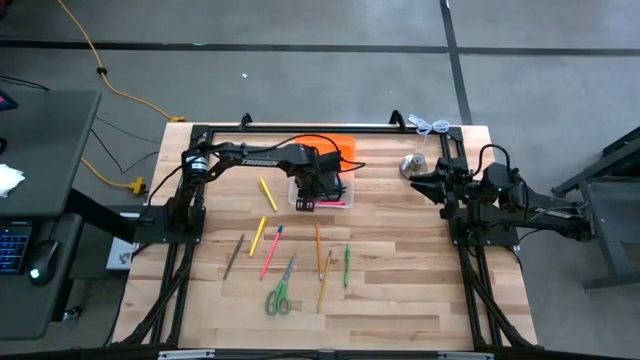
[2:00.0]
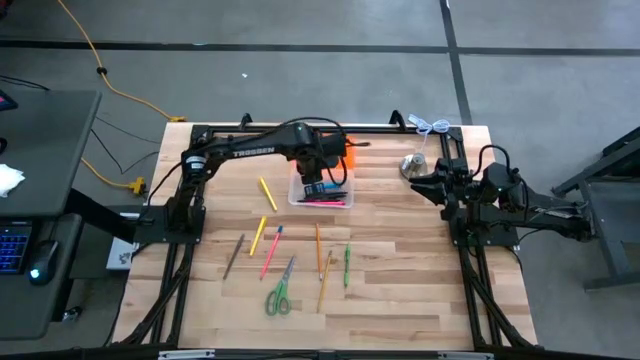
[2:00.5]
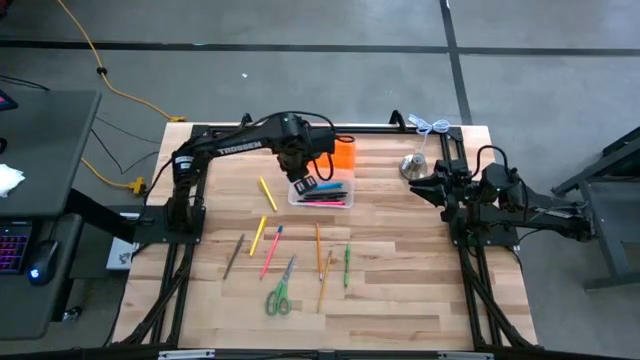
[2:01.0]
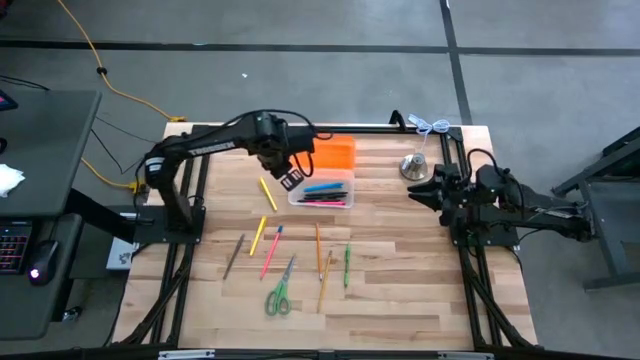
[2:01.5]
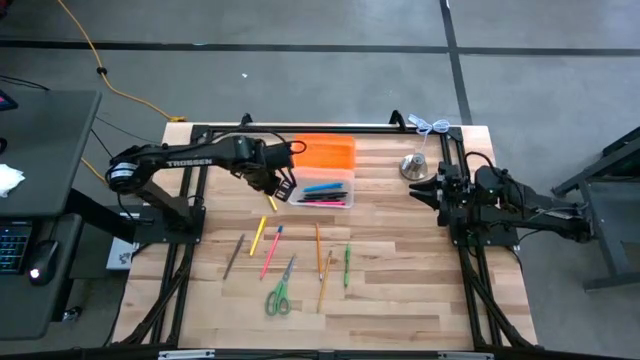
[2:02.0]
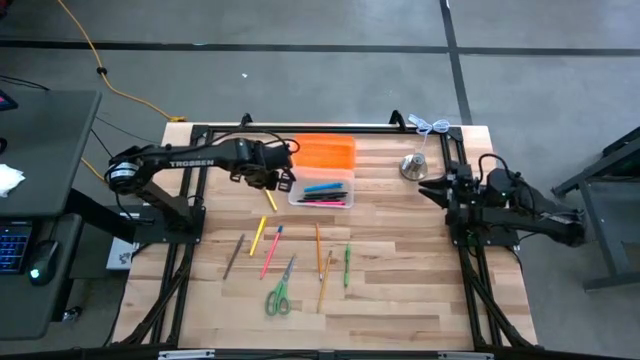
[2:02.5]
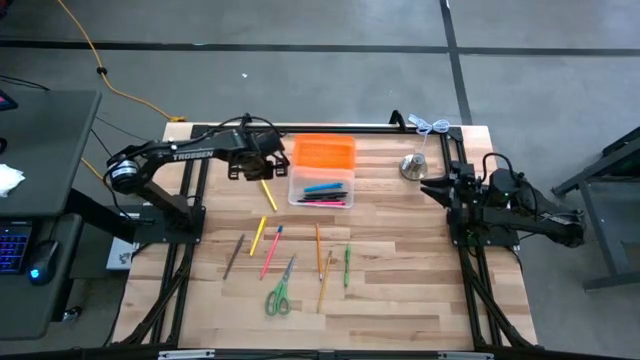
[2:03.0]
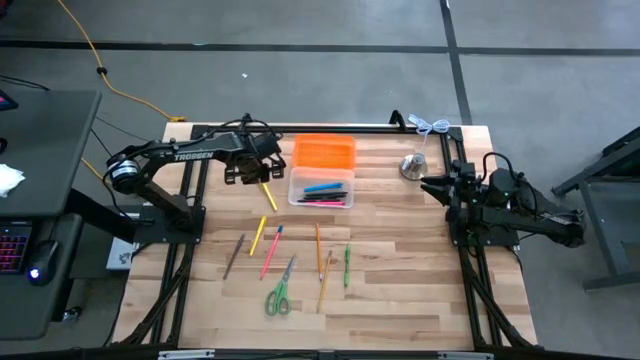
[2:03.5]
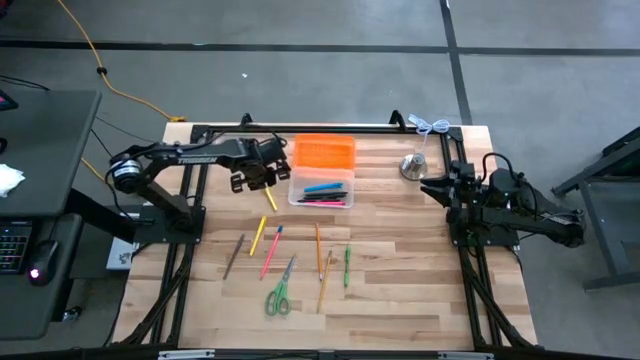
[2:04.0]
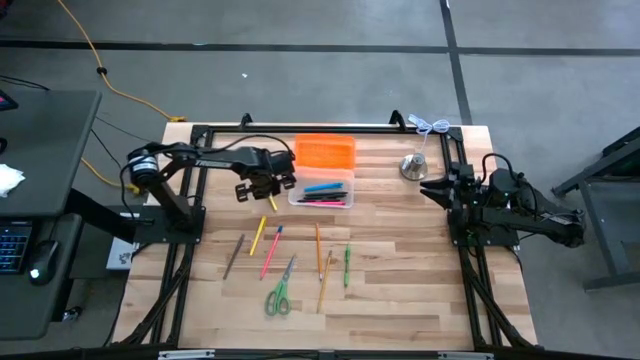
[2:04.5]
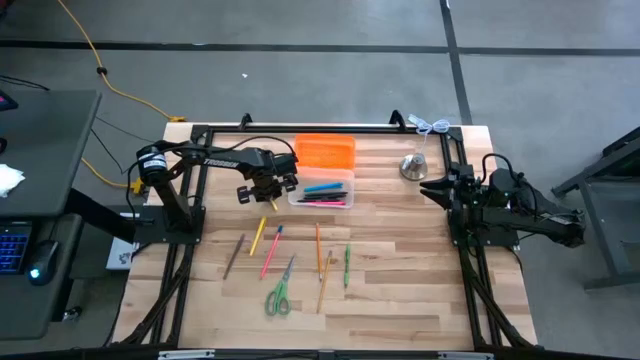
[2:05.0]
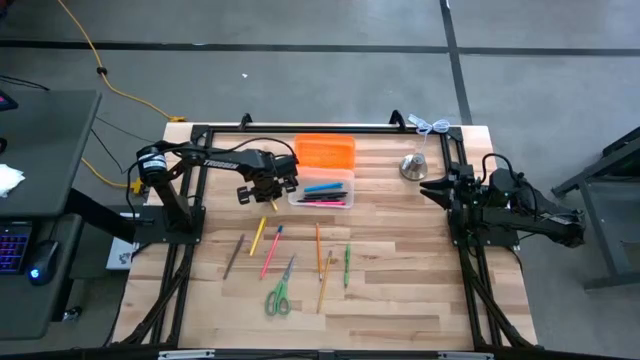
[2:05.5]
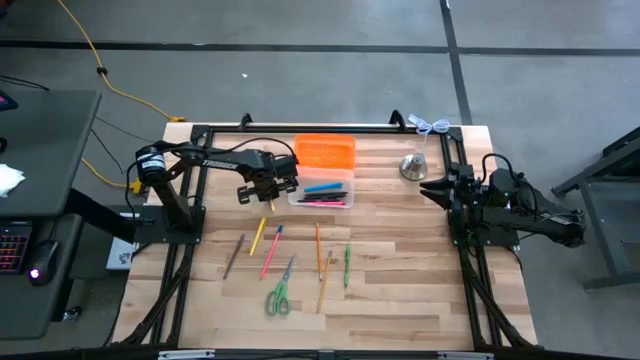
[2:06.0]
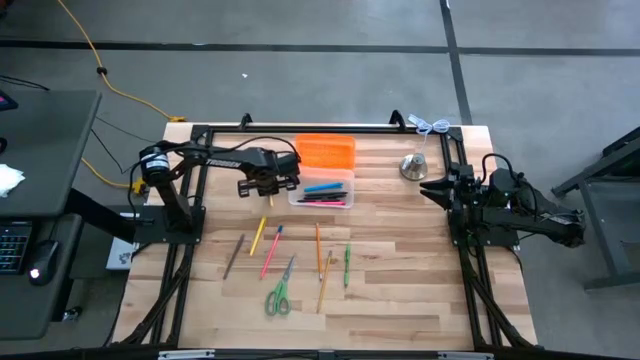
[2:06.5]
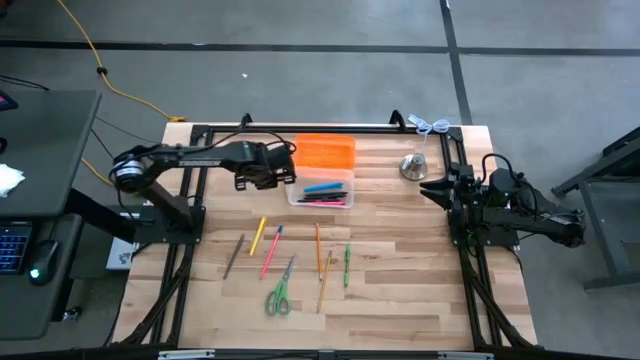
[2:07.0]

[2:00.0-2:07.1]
Task: Pick & place school supplies into a supply box
Put the yellow pen into the transparent supply box

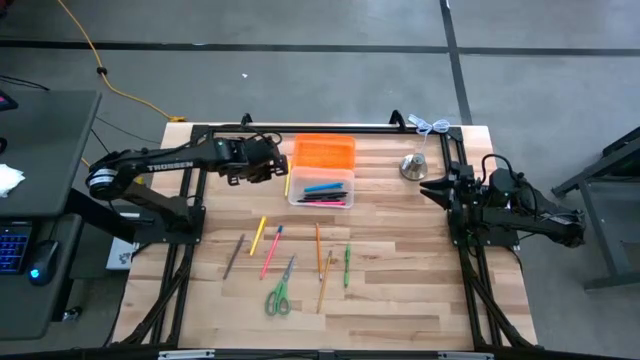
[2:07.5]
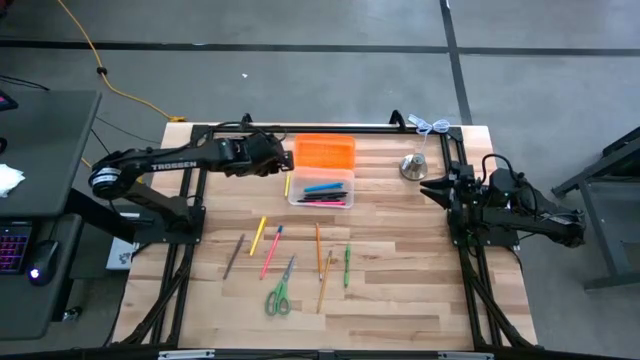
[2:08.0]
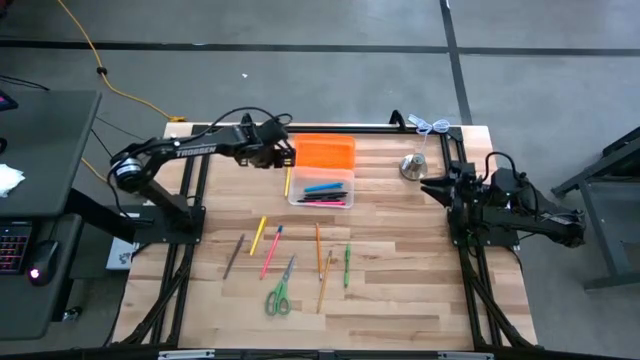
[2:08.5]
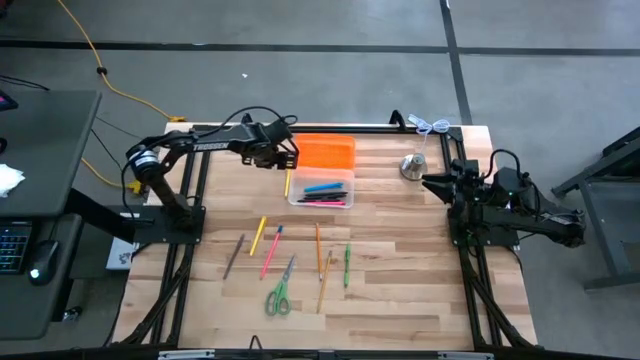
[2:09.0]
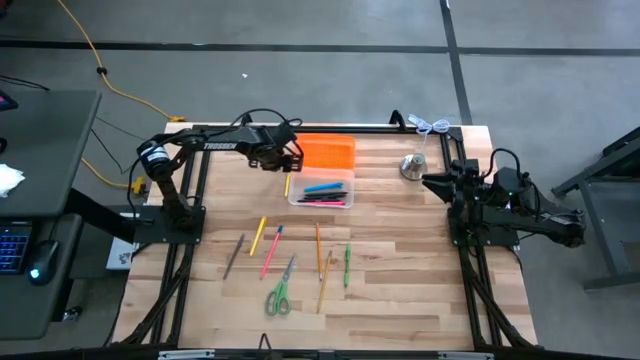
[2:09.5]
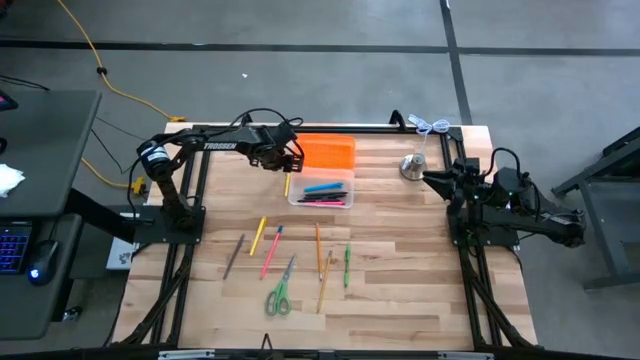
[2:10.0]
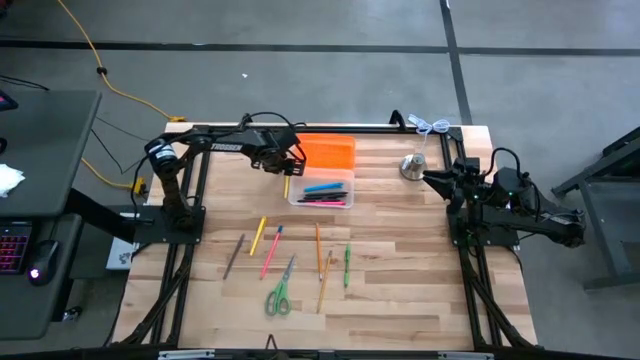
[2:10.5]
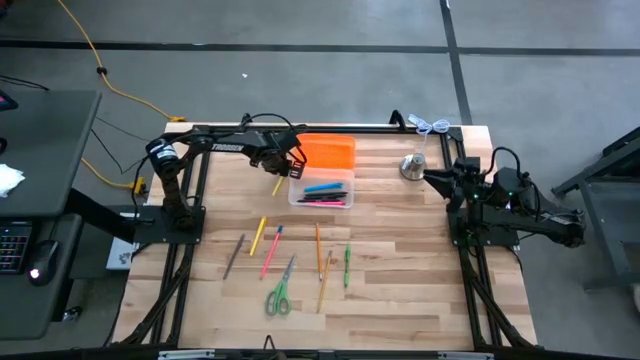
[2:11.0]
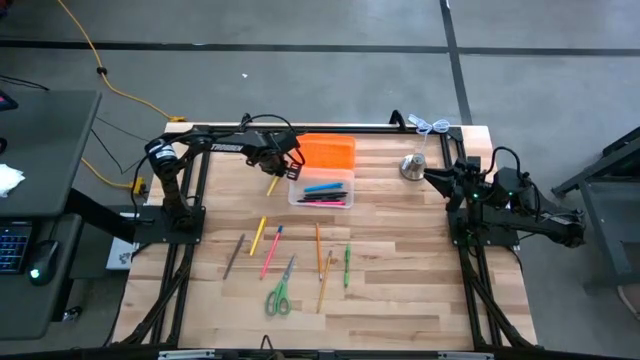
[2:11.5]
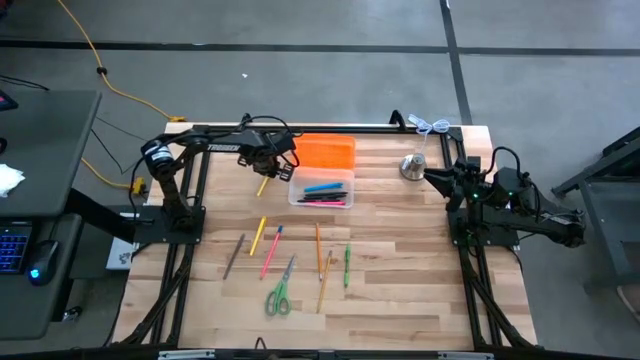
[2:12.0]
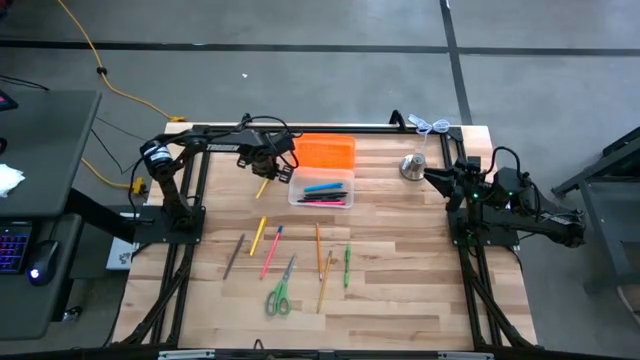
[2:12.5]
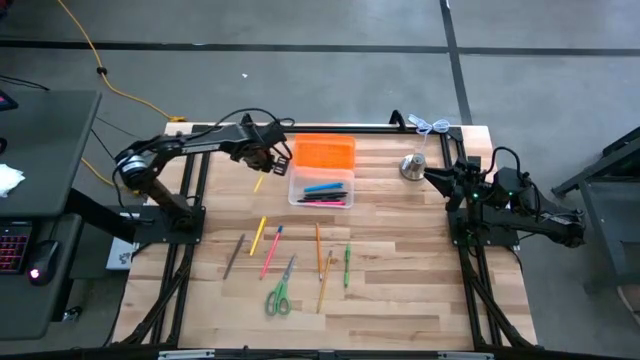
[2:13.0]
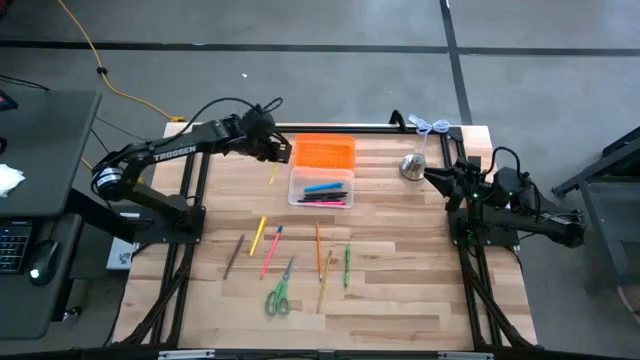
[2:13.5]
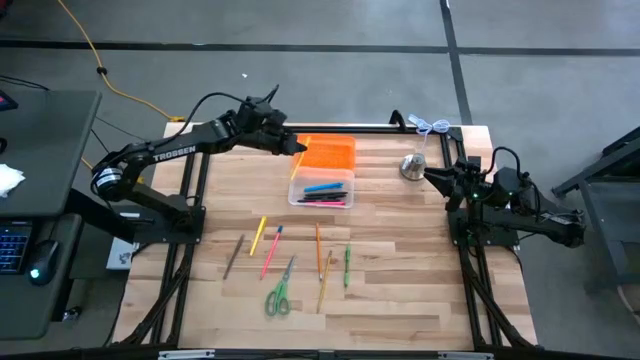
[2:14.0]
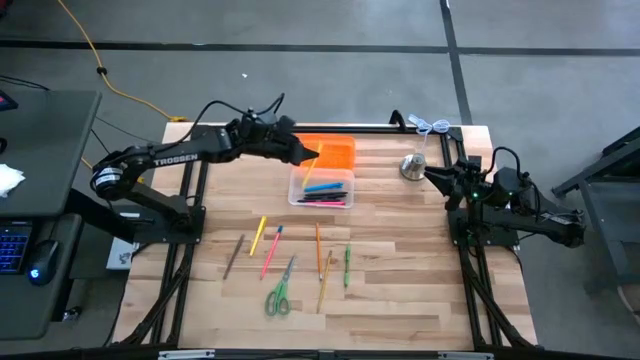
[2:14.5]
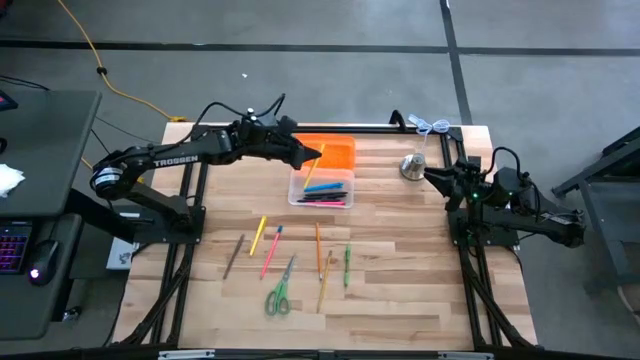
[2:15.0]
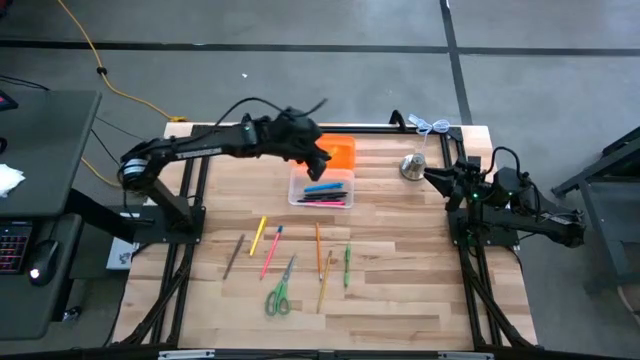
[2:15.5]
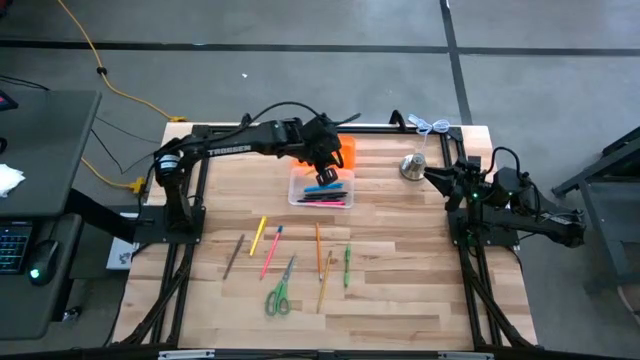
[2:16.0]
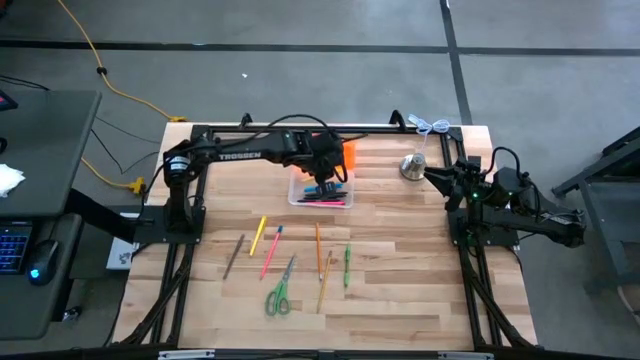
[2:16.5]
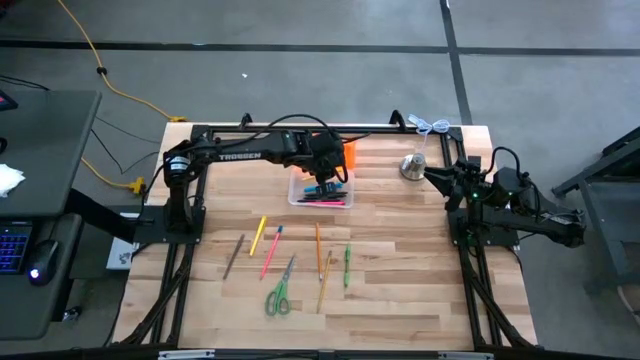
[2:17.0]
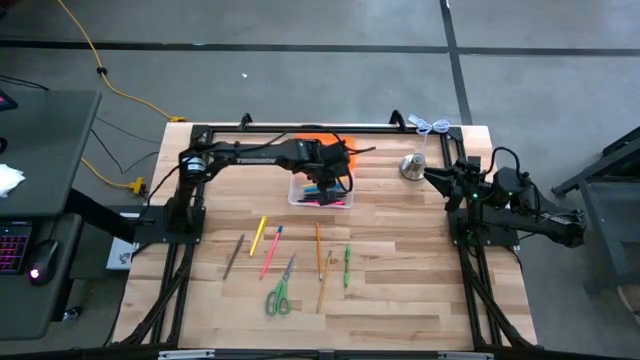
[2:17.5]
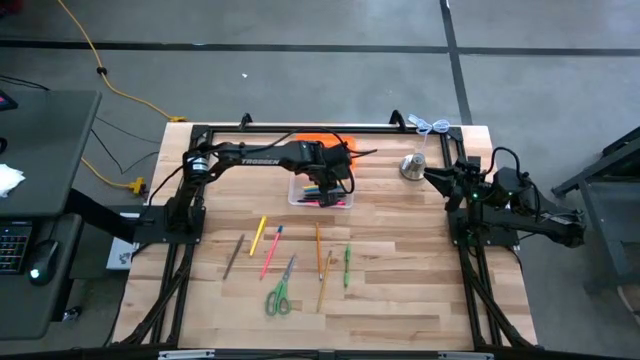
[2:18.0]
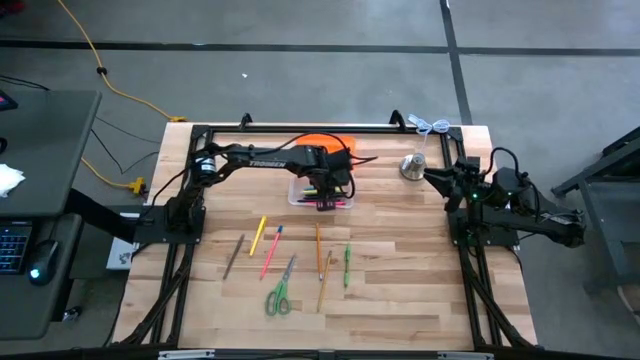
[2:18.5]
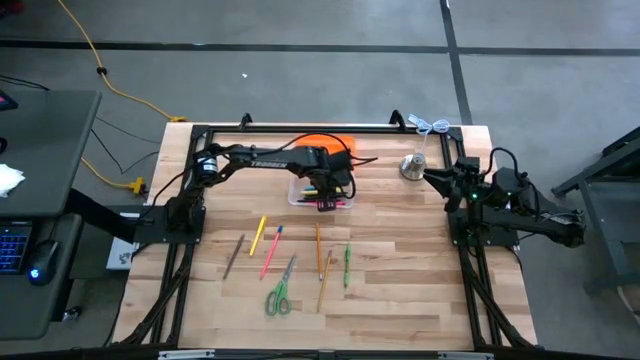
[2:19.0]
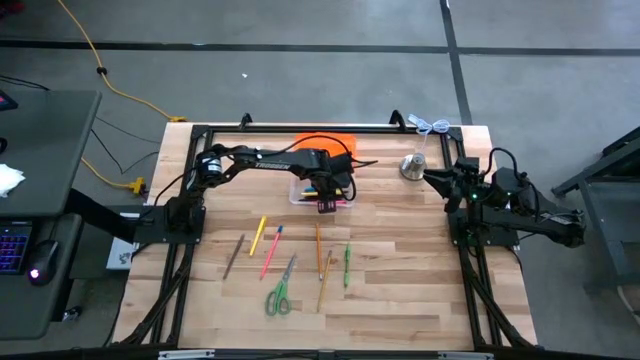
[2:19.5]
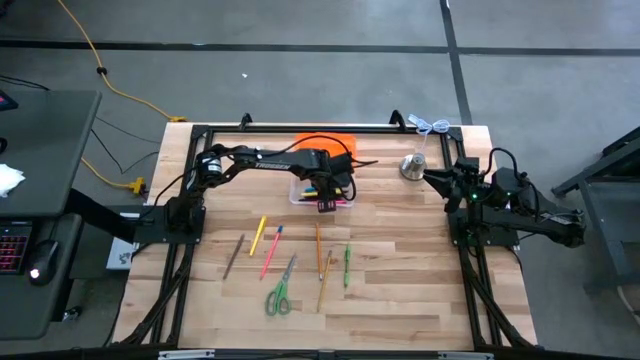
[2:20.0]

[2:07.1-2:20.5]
Put the yellow pen into the transparent supply box
